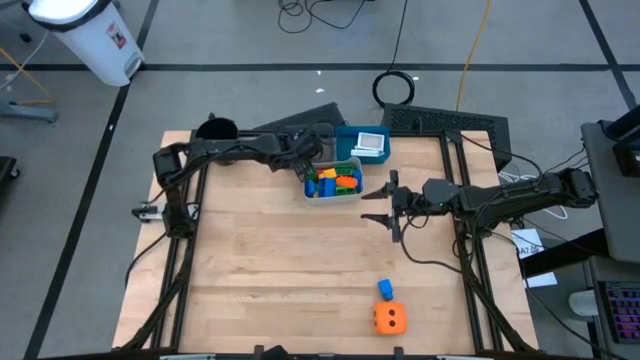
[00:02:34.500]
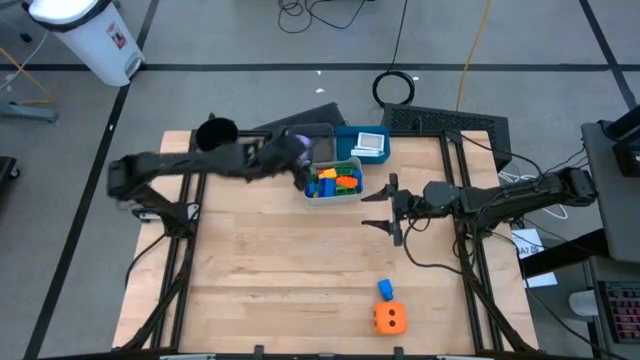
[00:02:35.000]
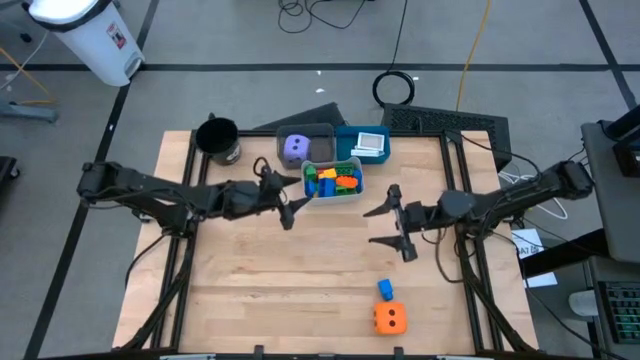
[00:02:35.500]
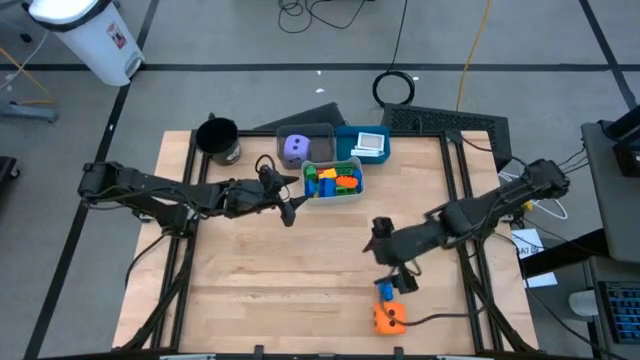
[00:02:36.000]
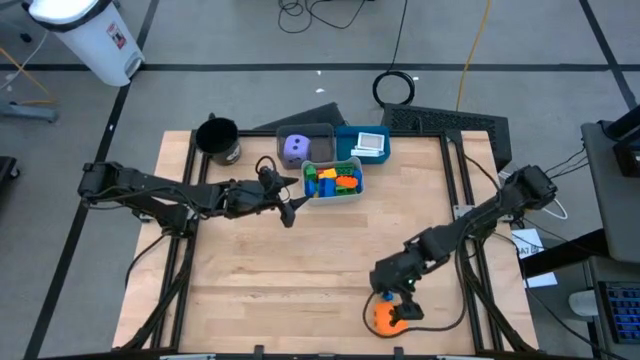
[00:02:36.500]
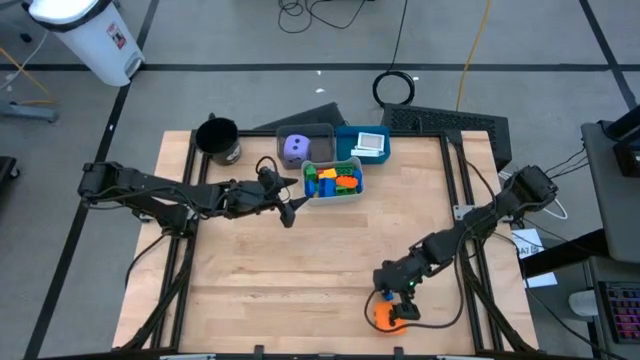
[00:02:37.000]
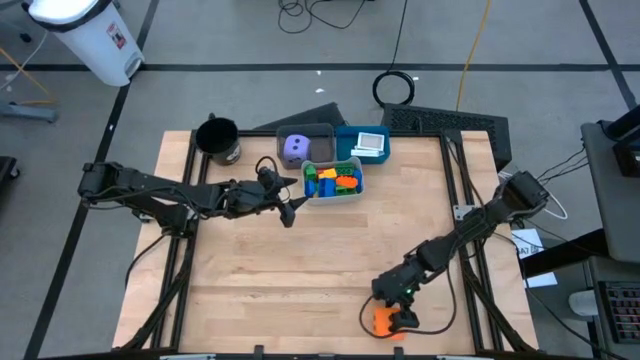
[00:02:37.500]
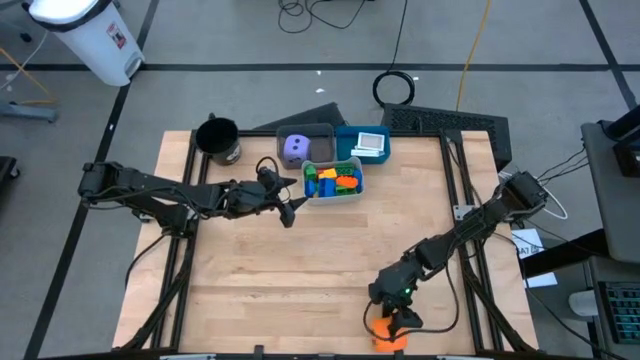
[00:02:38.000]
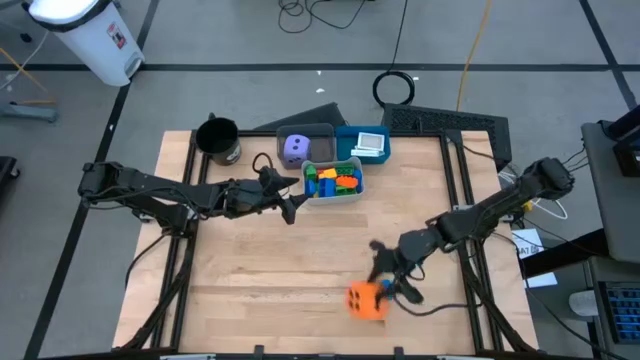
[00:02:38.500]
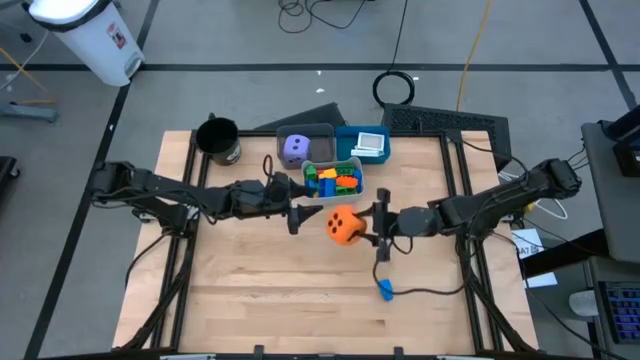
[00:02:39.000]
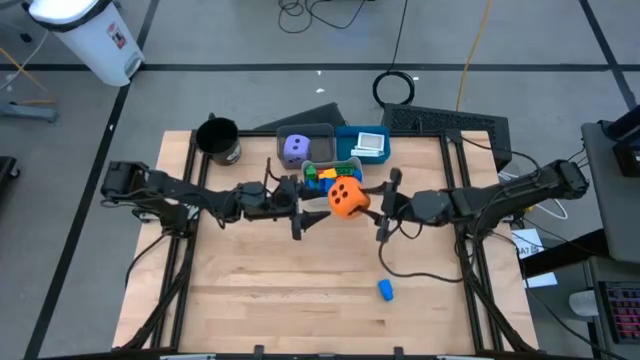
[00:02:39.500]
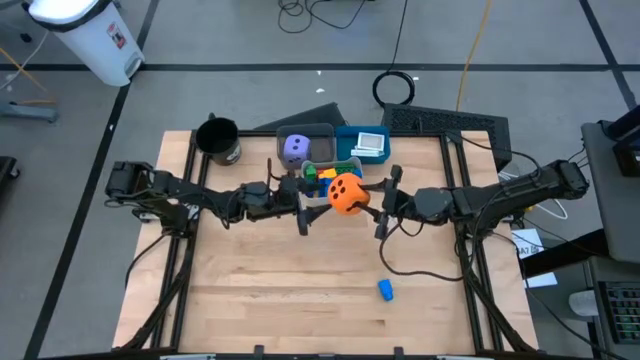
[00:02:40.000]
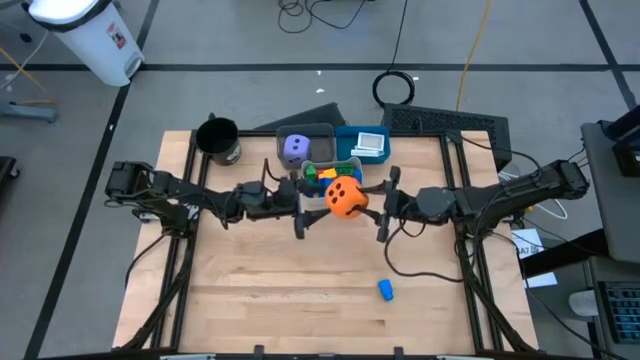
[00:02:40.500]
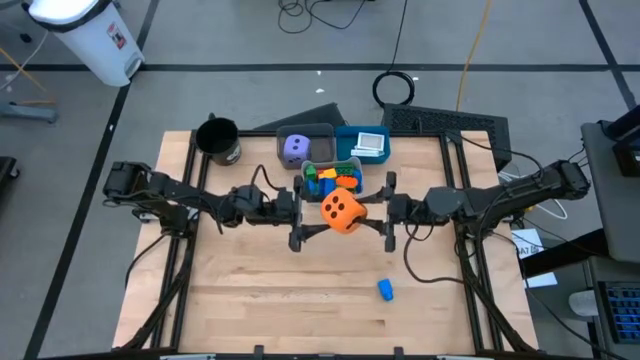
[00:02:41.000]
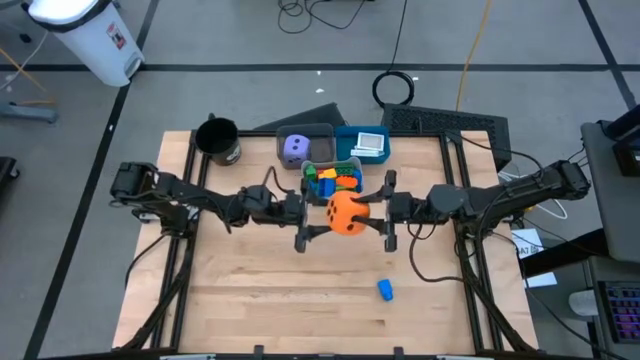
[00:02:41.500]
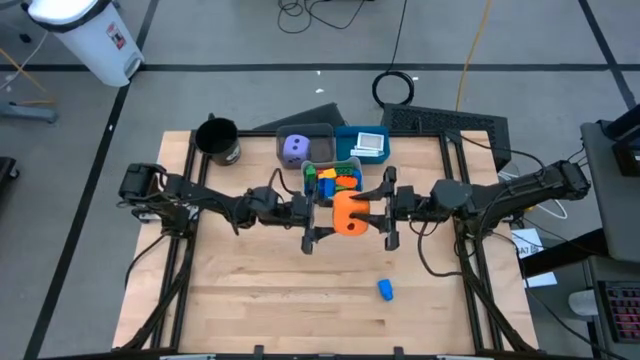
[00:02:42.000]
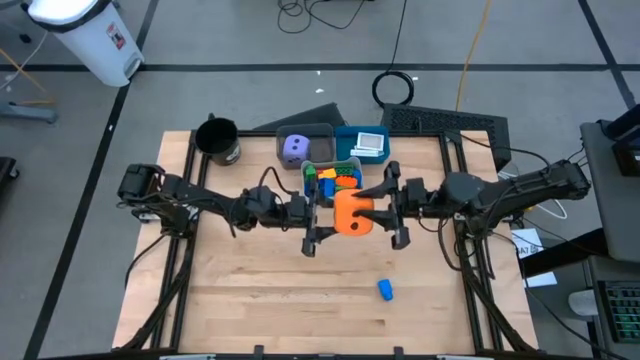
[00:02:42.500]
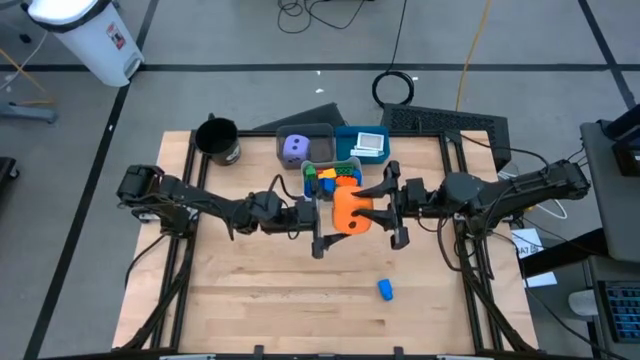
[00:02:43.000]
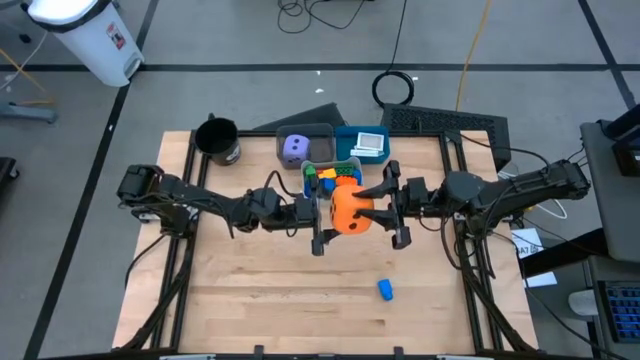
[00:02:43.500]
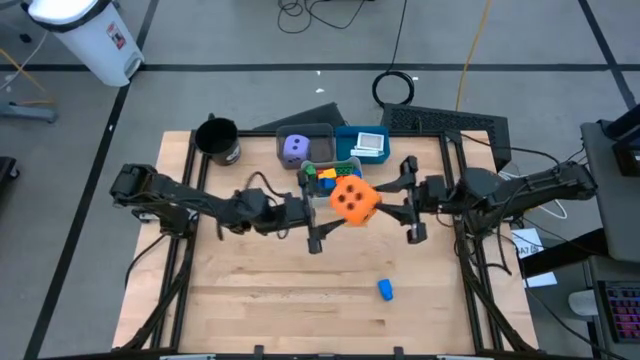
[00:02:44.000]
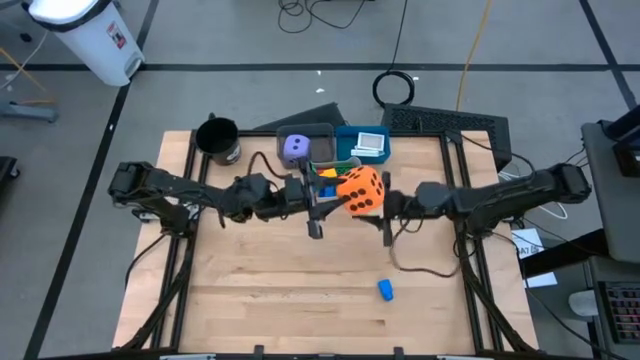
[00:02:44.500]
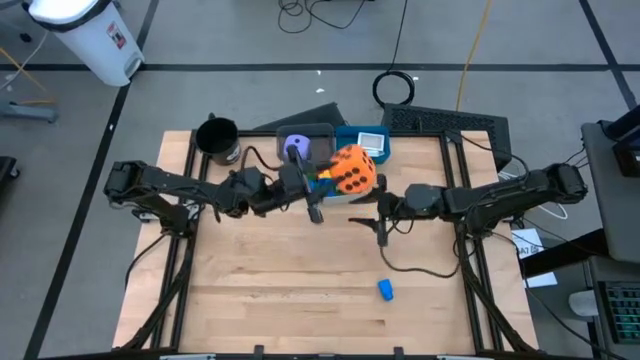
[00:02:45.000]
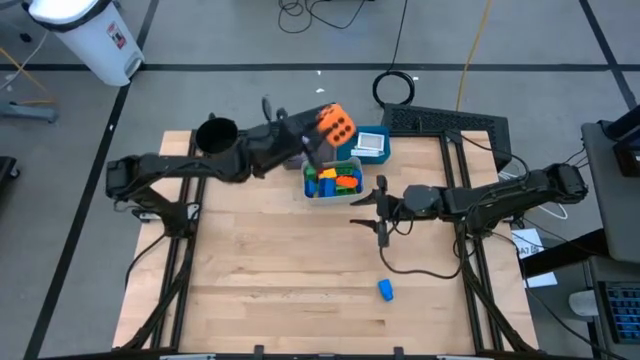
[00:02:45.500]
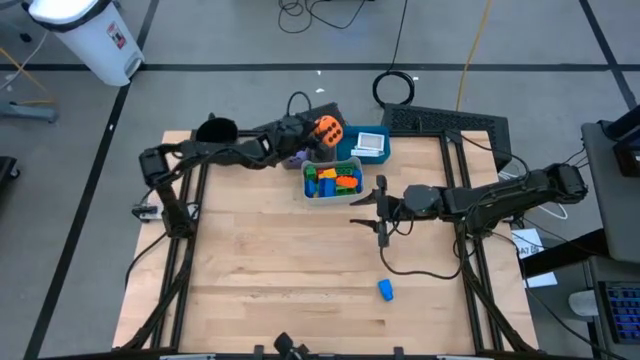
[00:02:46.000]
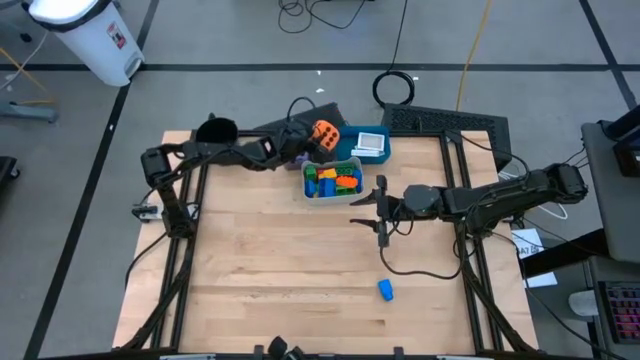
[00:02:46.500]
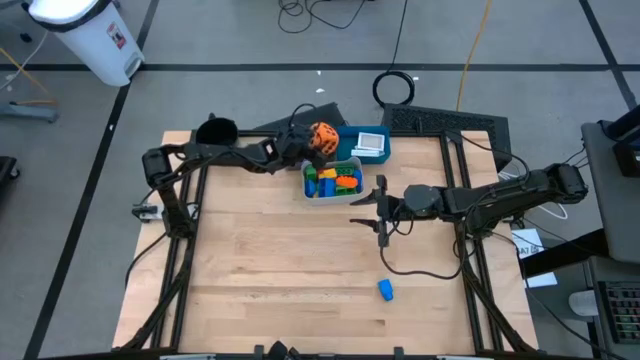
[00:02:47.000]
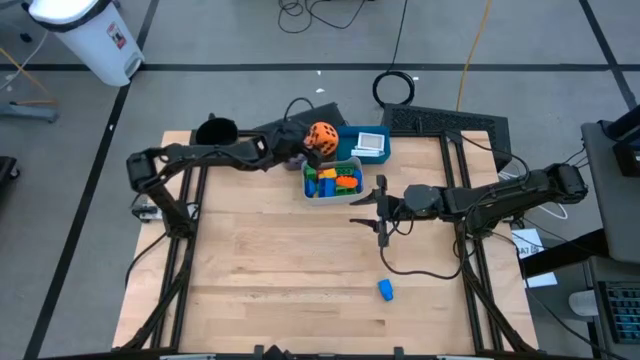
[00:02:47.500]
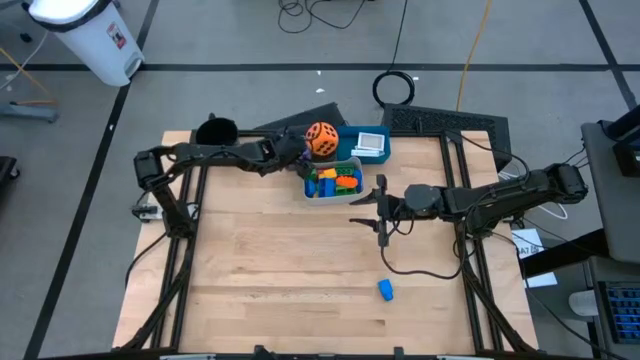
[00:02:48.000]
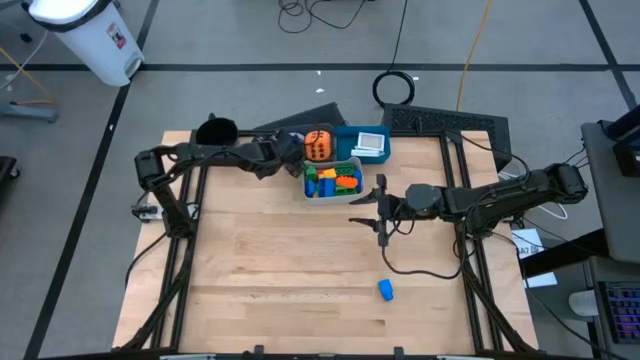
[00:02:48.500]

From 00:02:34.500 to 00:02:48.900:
Task: Pick & Place Toys
Put the orange dice into the black bin

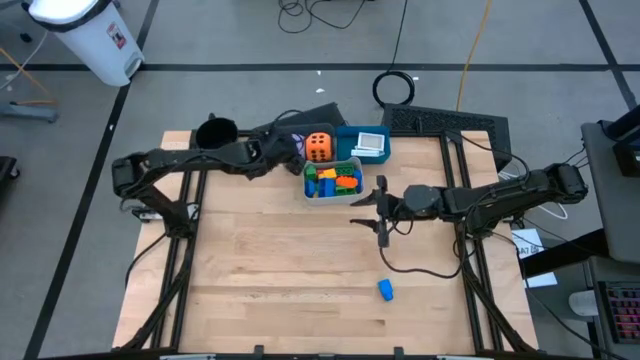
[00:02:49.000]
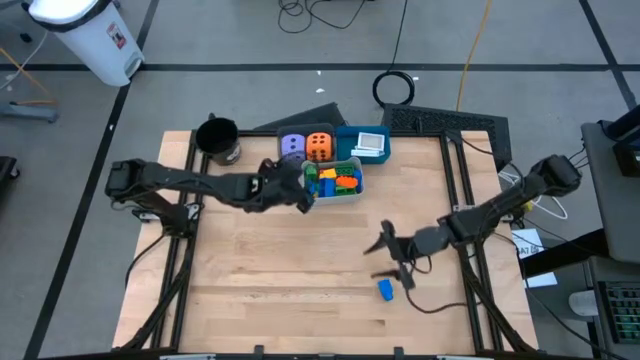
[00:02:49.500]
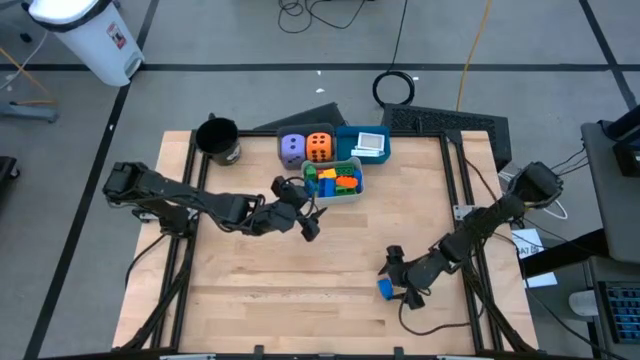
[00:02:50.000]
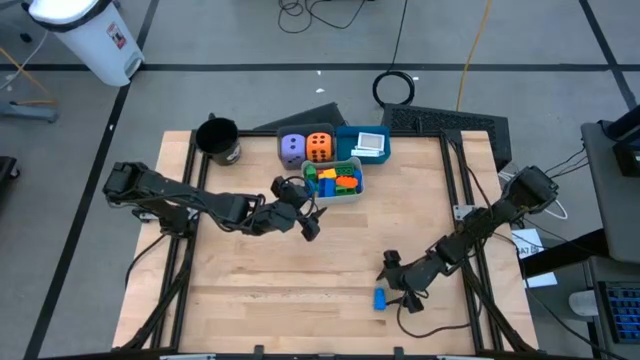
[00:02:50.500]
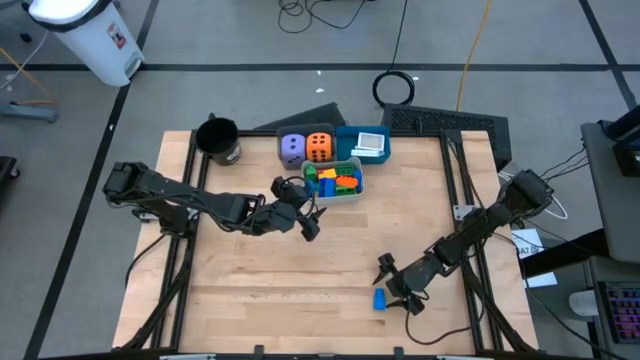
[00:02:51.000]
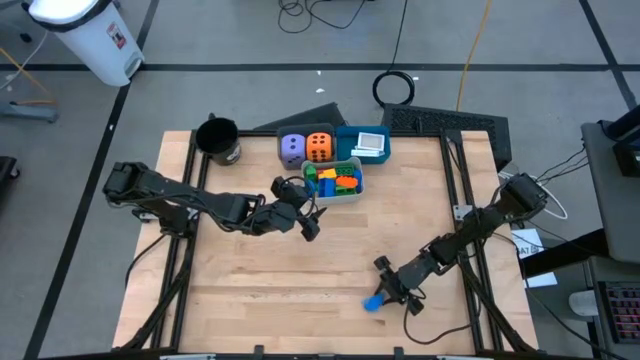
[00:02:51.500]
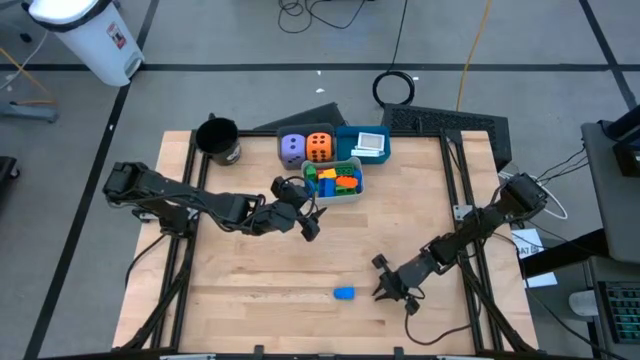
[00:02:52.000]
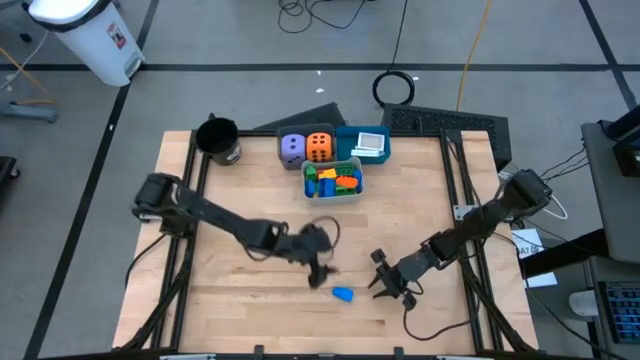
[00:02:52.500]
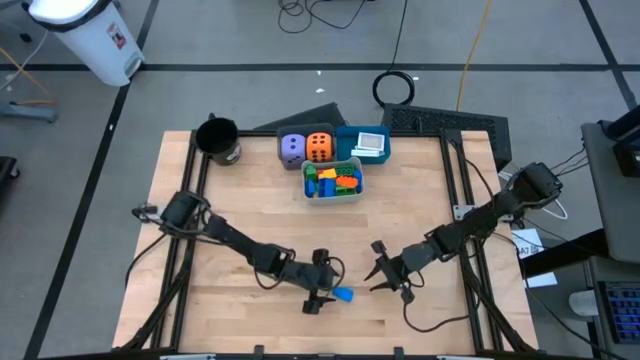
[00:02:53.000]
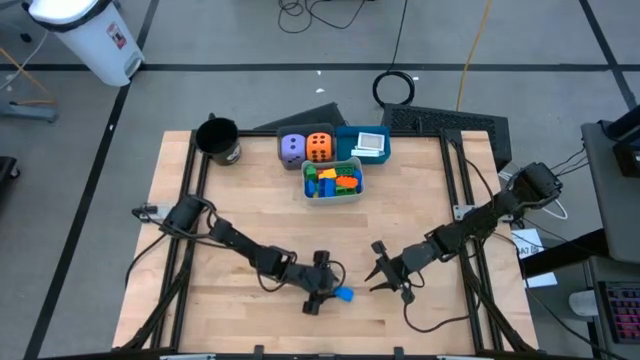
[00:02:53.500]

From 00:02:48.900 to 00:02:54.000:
Put the blue game piece into the gray bin

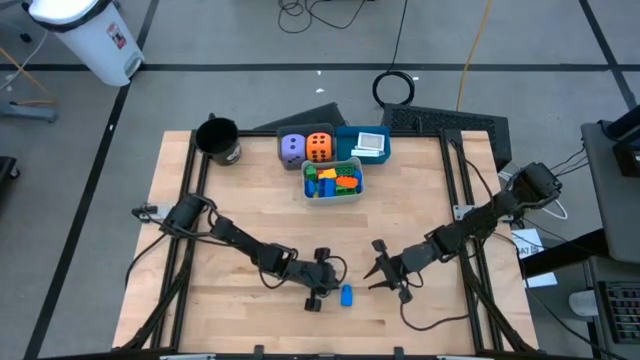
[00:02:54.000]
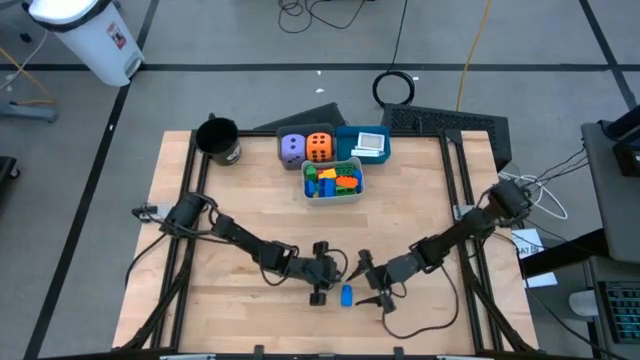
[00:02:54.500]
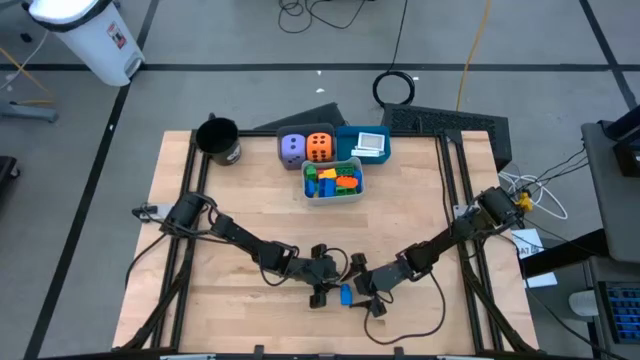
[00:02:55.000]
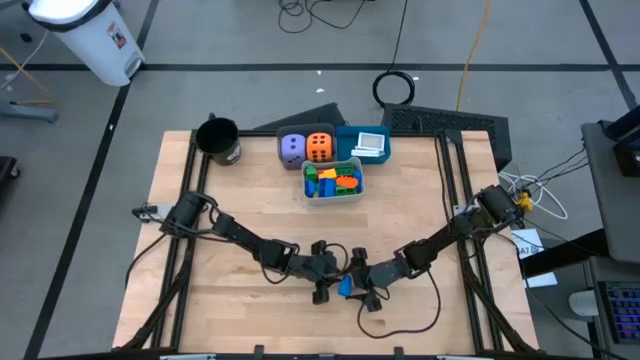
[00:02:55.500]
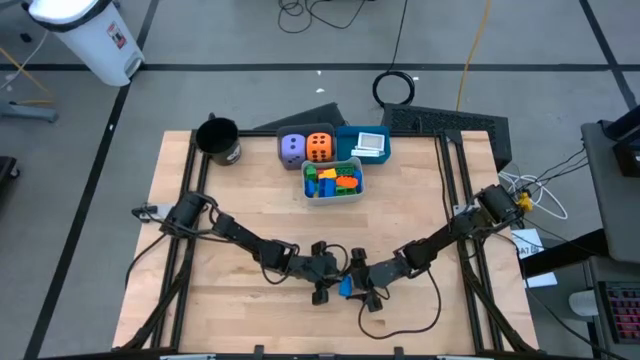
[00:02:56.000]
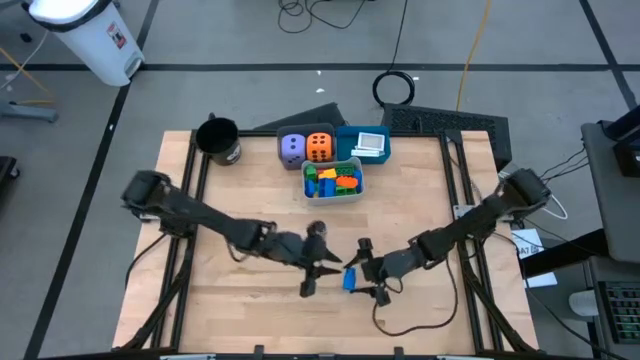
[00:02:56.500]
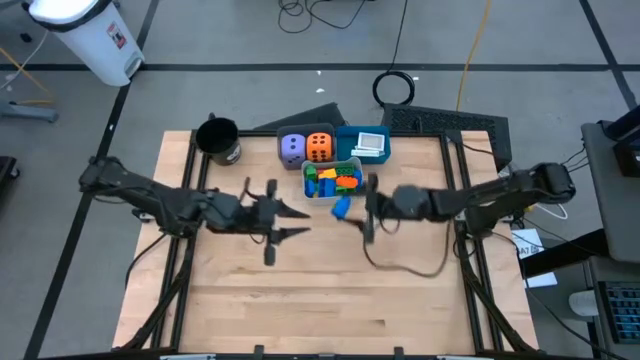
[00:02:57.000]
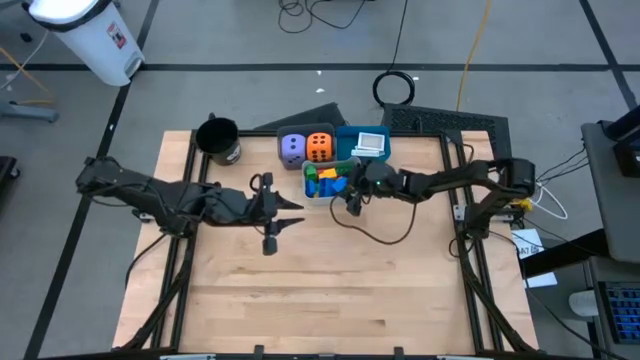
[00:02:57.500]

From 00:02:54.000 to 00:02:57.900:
Put the blue game piece into the gray bin
